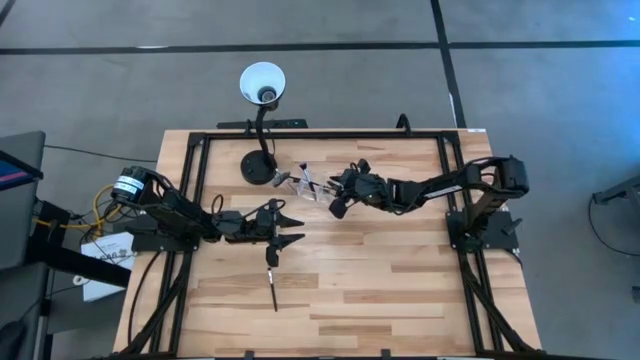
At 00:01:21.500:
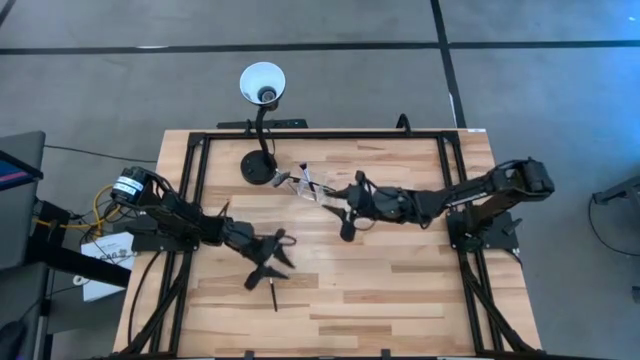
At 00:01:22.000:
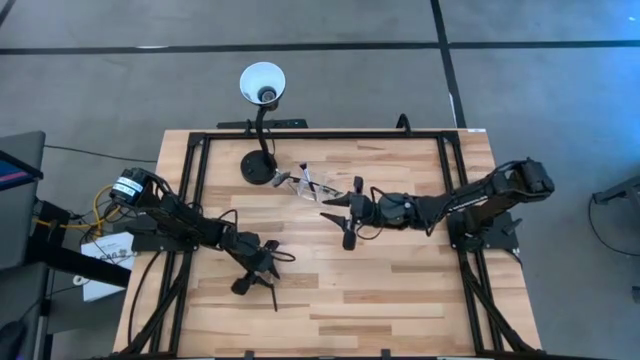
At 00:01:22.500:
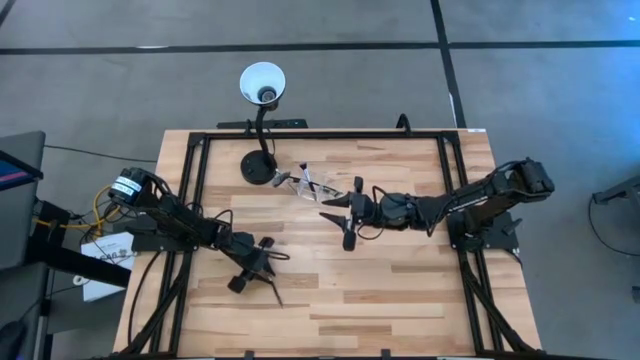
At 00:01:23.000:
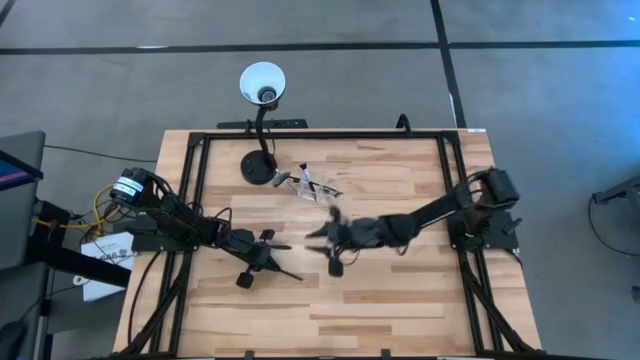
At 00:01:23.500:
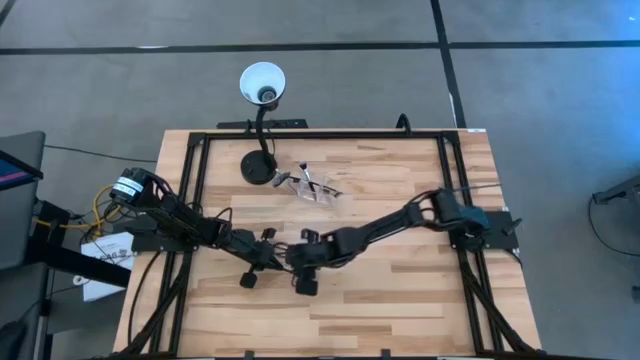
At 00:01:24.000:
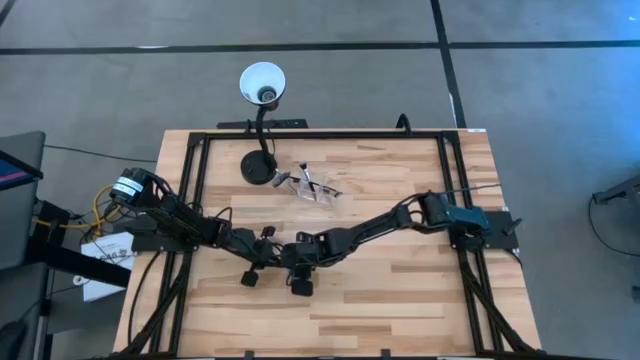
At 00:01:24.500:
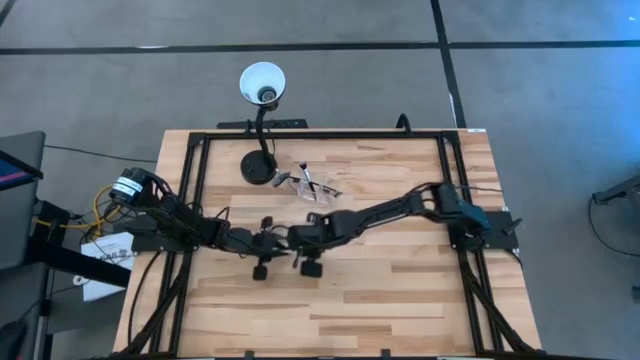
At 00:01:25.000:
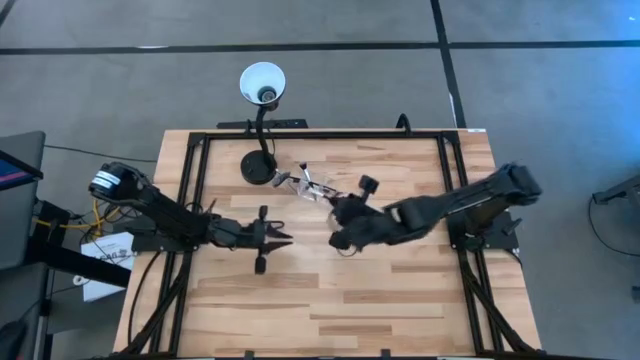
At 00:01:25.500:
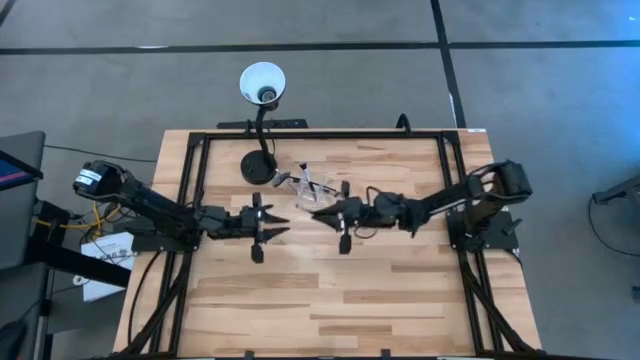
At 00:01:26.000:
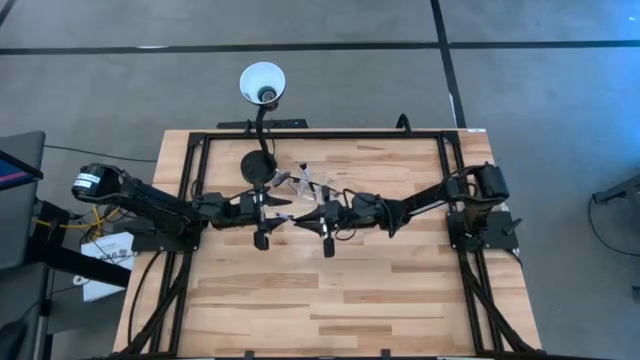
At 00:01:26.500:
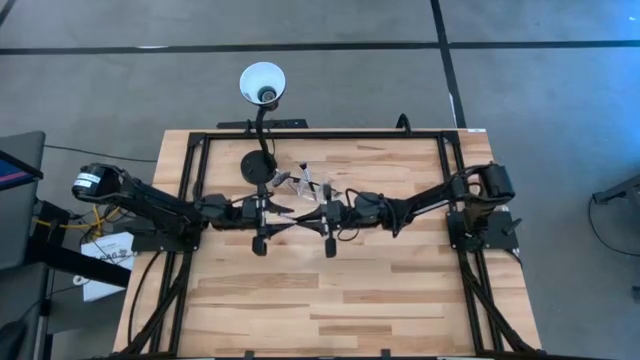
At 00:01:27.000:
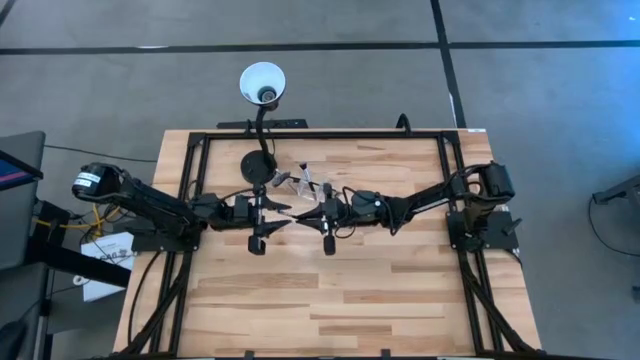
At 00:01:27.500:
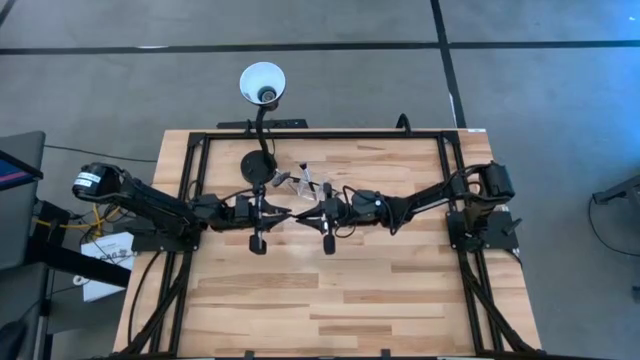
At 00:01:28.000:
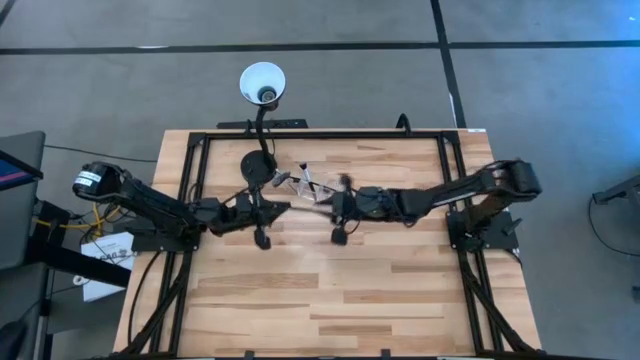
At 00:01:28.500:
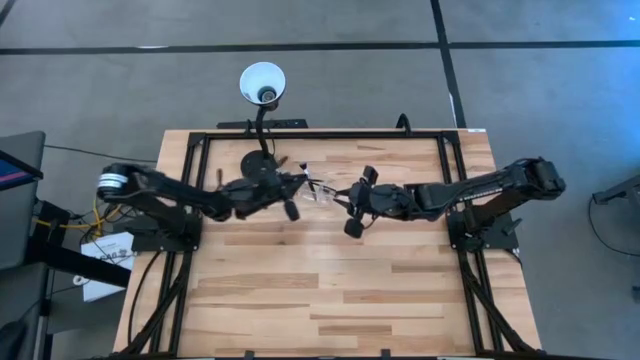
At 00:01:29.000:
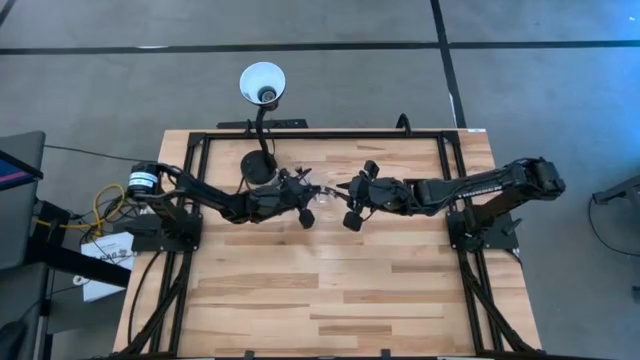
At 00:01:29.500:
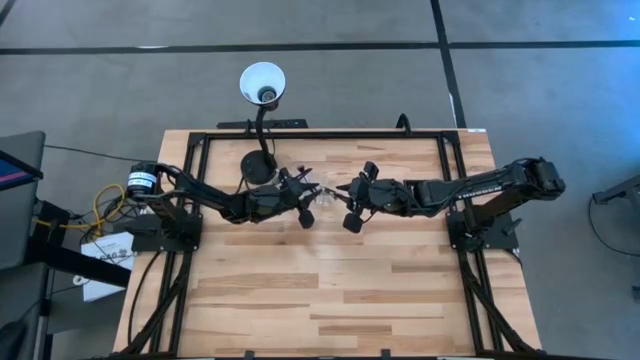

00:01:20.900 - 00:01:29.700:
Task: Sort items
Put the eyeshadow brush into the right section of the transparent organizer

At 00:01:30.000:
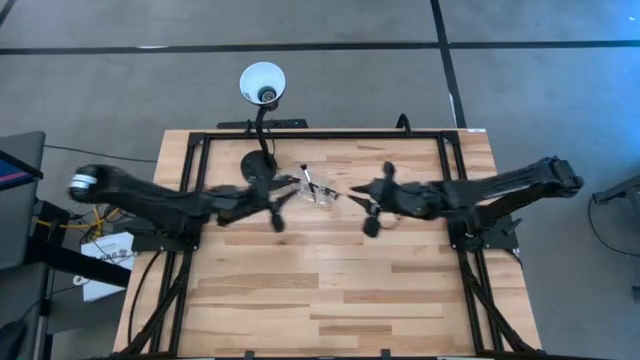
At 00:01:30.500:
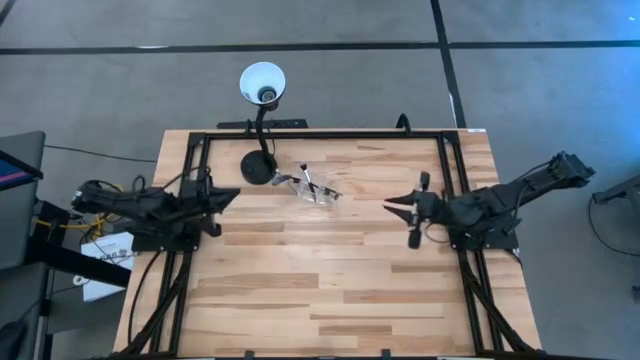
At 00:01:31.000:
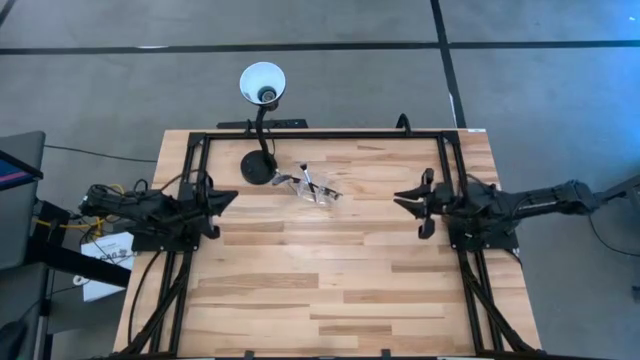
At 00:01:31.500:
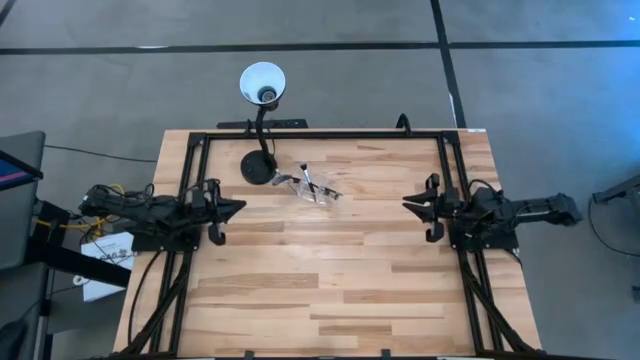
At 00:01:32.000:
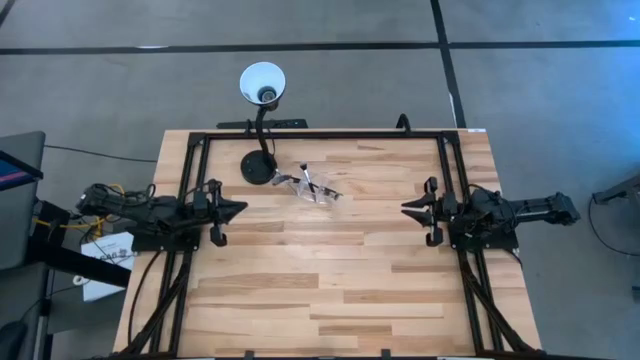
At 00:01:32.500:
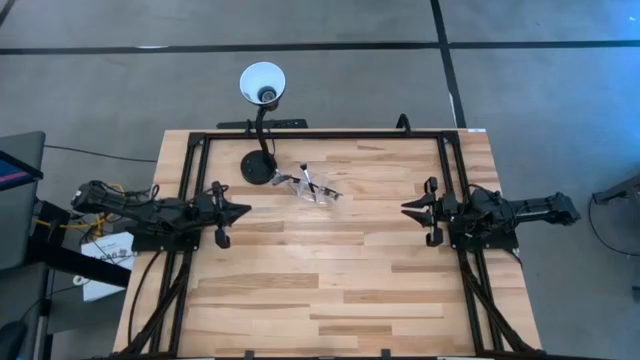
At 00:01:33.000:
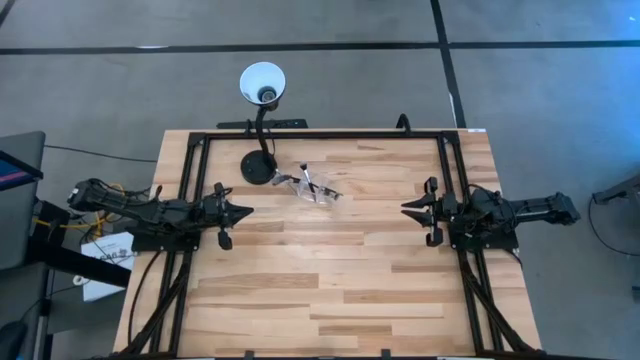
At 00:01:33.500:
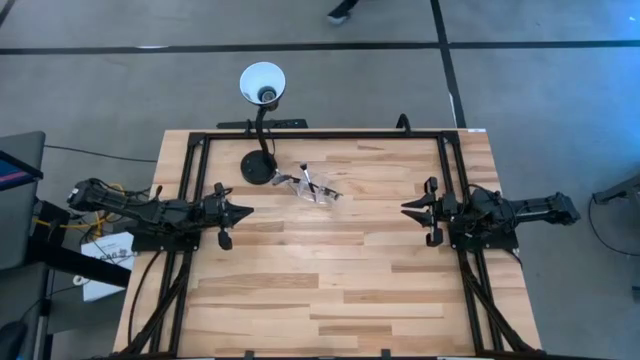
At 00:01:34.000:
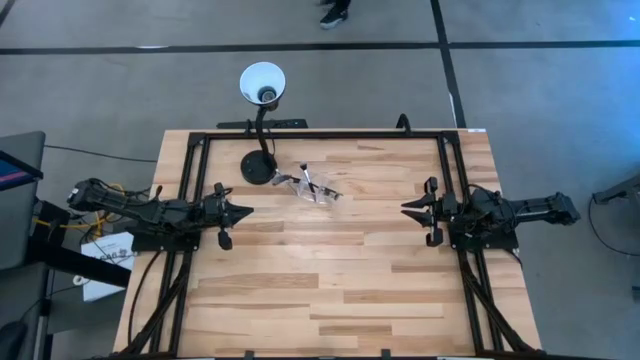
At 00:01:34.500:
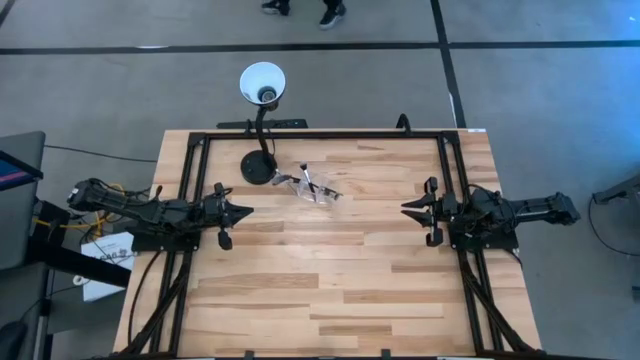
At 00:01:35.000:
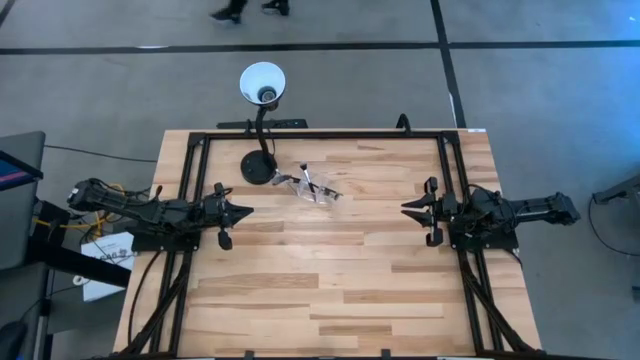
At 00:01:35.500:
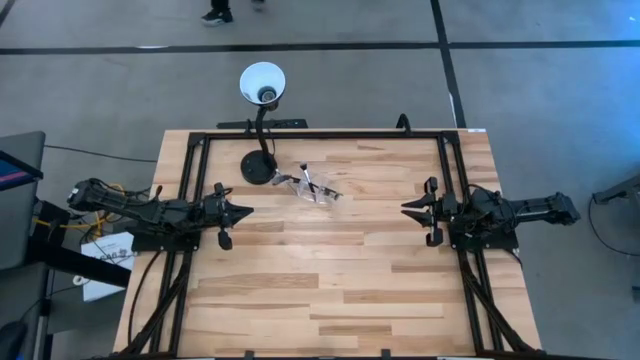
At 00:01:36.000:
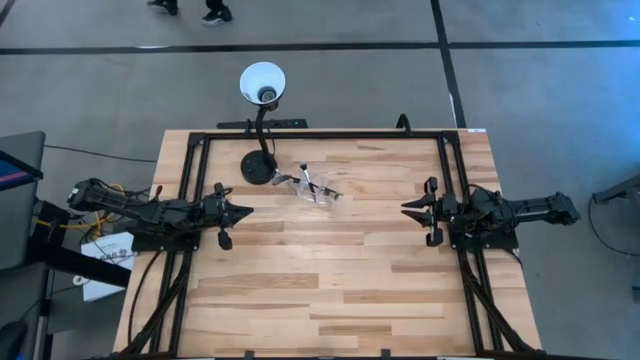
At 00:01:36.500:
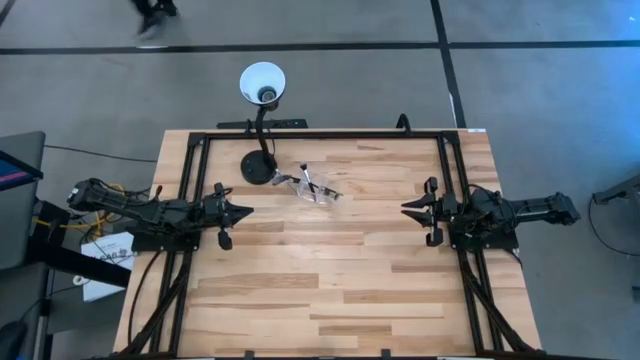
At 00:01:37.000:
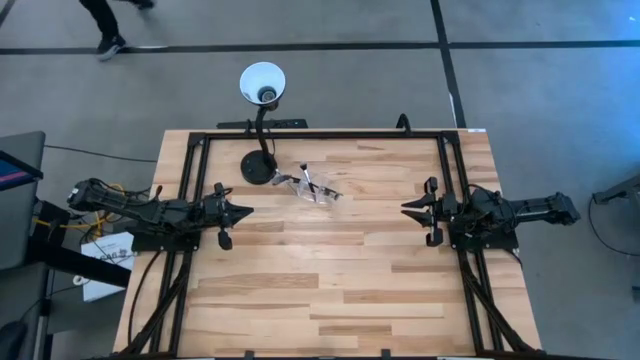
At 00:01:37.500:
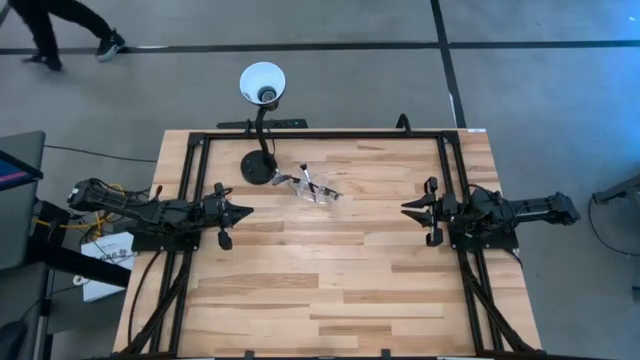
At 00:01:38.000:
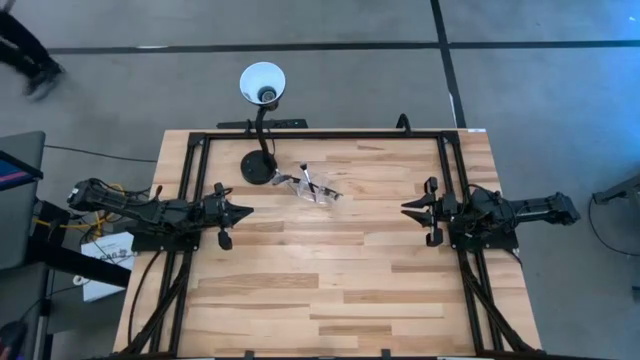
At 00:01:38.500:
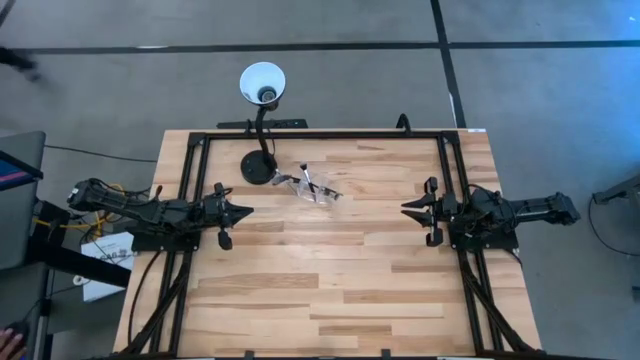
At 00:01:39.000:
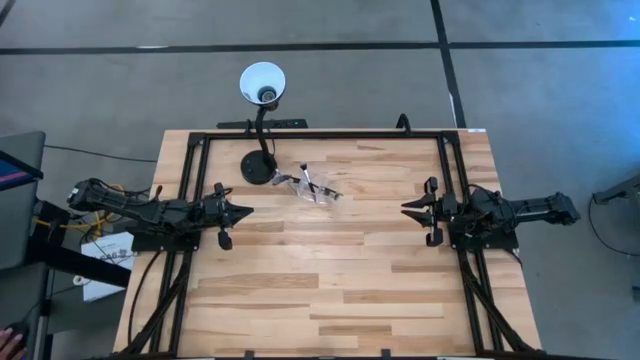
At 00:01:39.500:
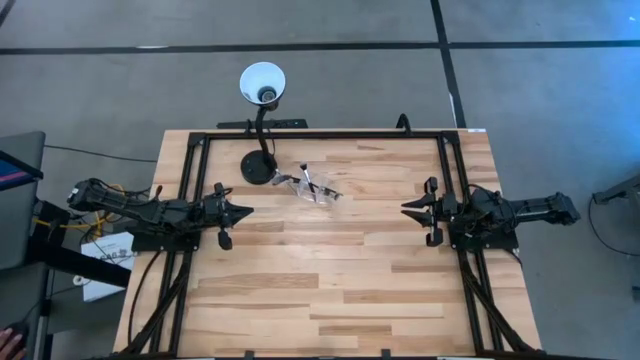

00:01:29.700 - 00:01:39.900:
Return to home position

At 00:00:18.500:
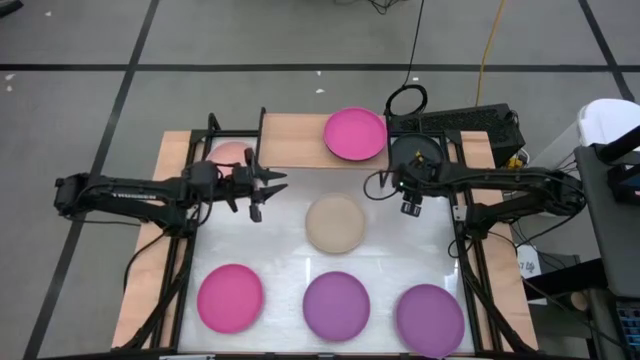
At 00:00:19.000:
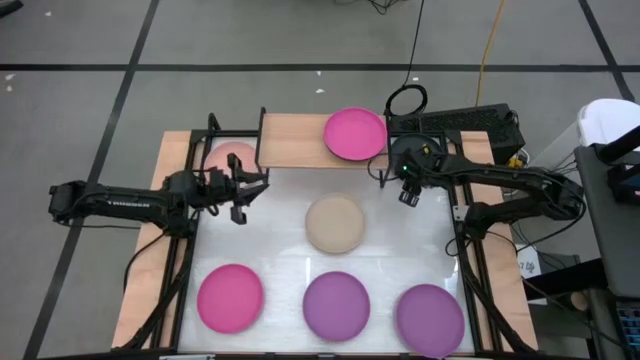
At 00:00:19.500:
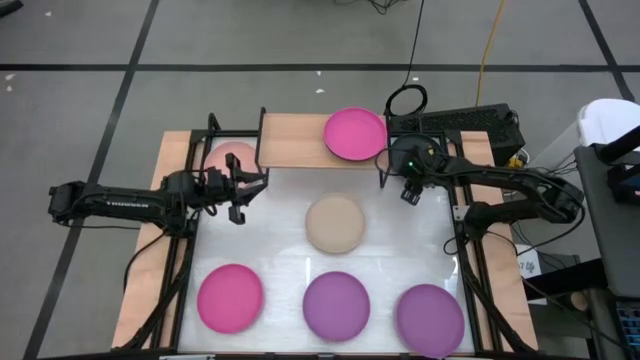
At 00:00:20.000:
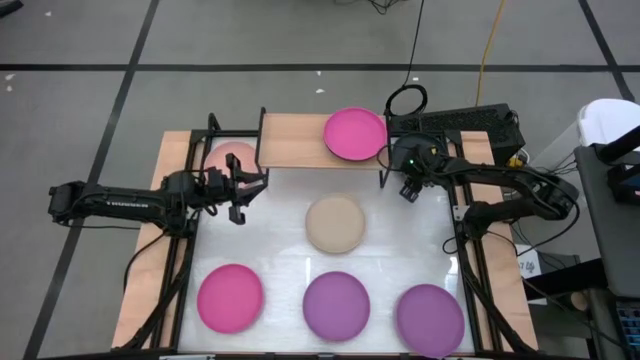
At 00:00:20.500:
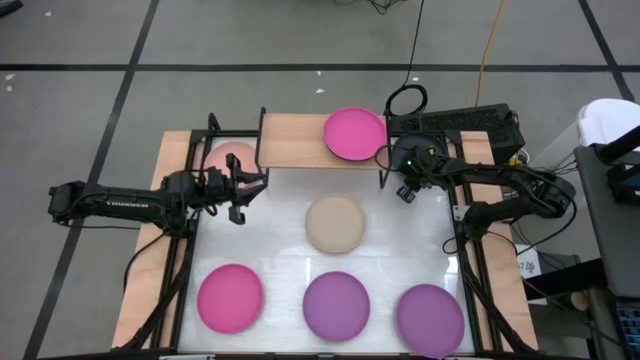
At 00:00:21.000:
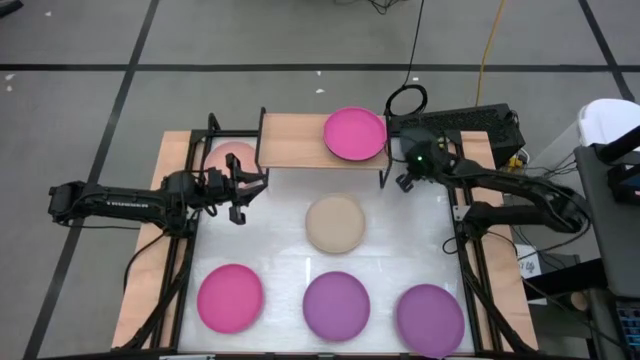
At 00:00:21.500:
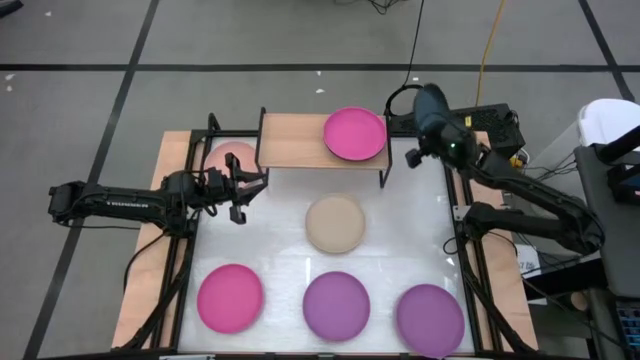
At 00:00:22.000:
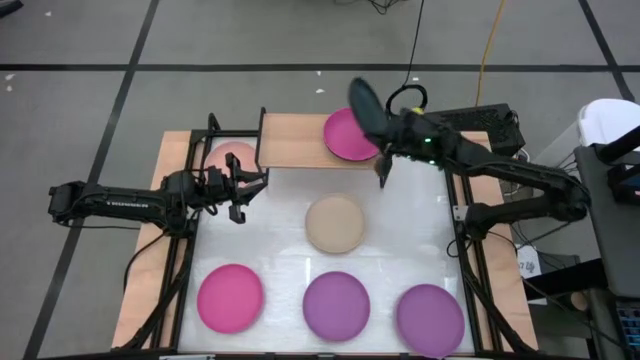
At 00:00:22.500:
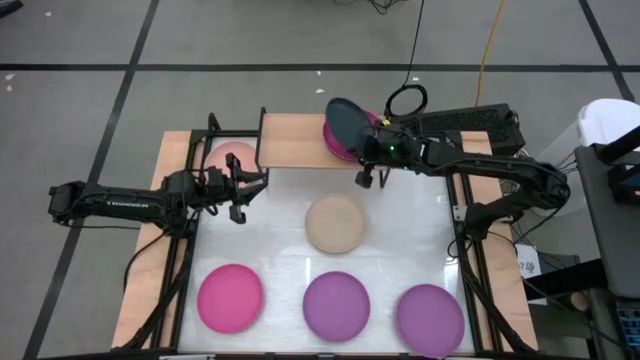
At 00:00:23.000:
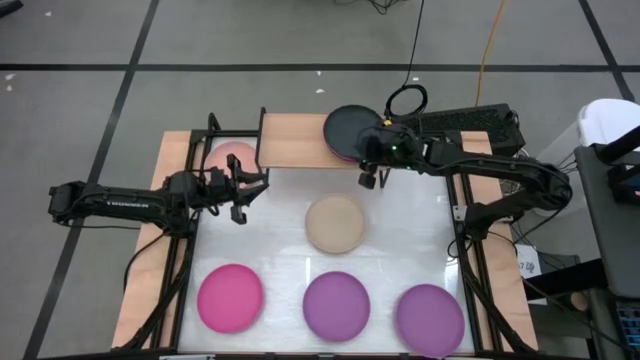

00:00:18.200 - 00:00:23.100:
Task: Place and stack plates onto a shelf
Stack the black plate on the pink plate on the shelf
